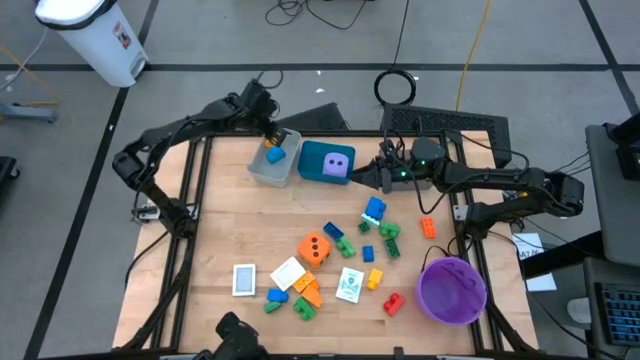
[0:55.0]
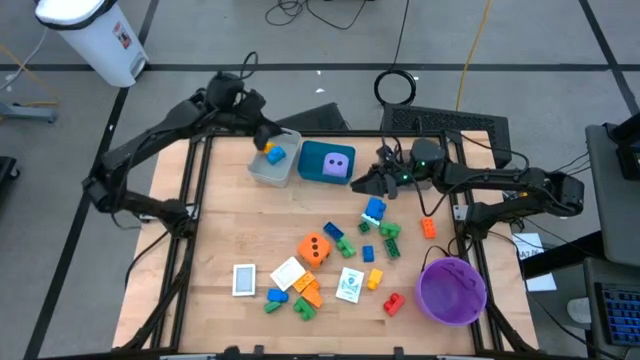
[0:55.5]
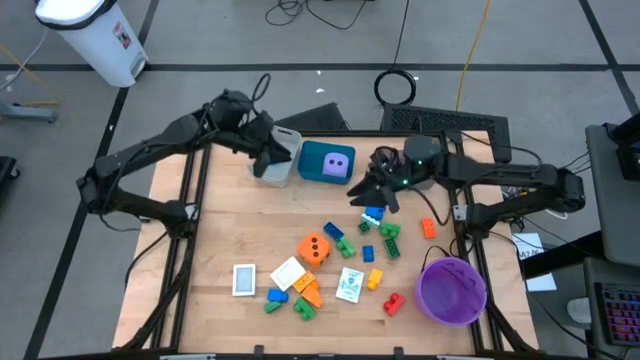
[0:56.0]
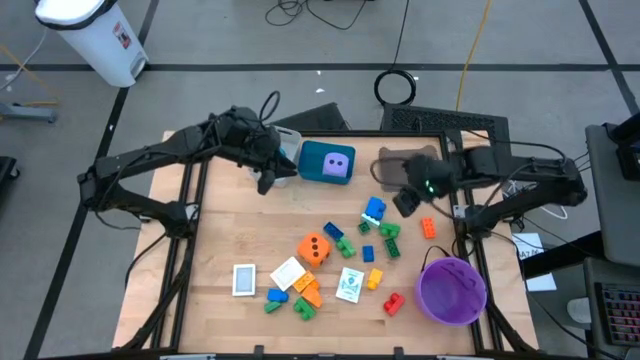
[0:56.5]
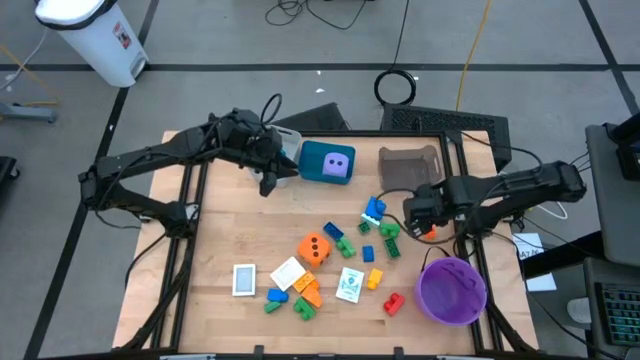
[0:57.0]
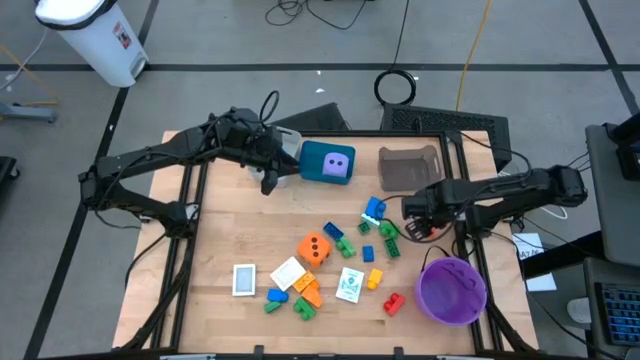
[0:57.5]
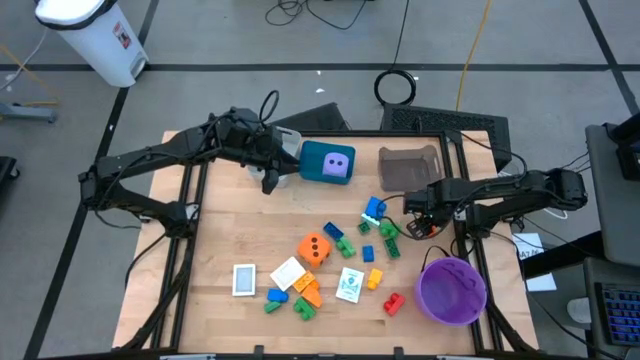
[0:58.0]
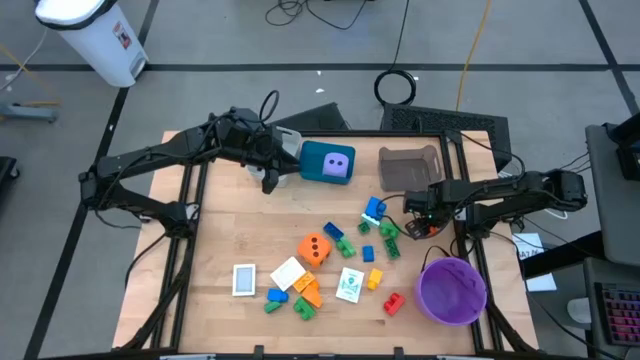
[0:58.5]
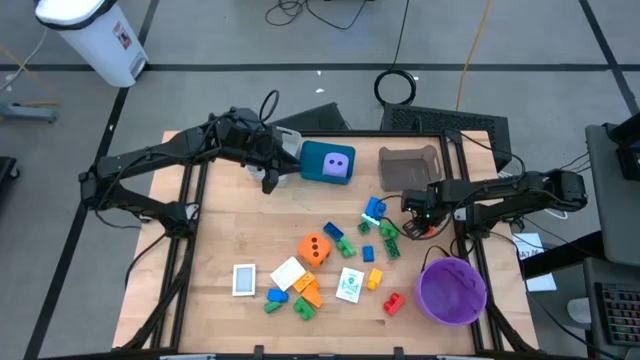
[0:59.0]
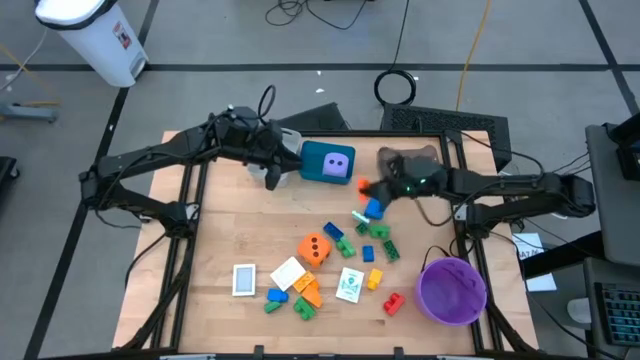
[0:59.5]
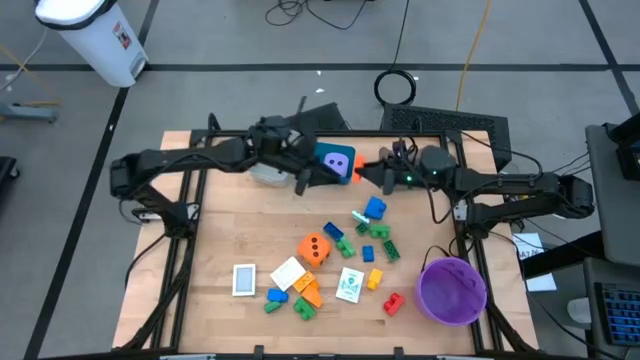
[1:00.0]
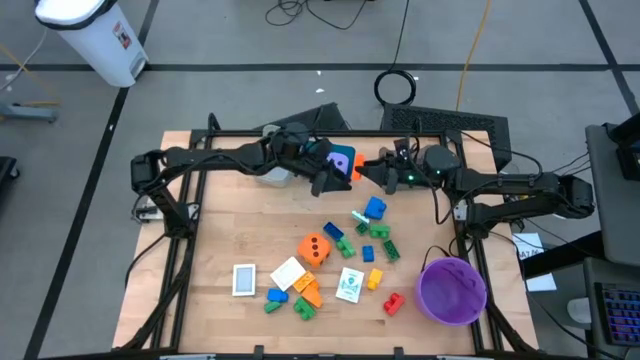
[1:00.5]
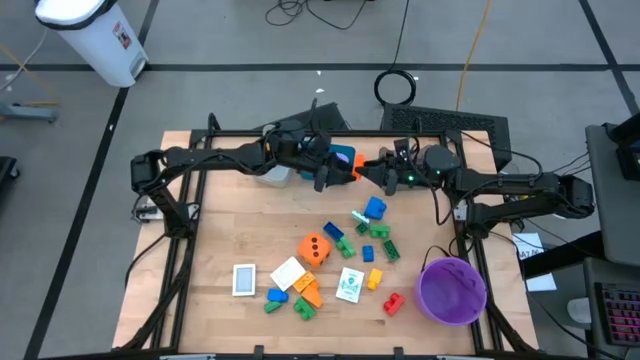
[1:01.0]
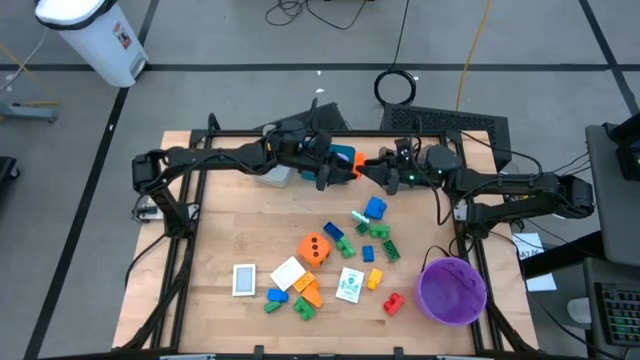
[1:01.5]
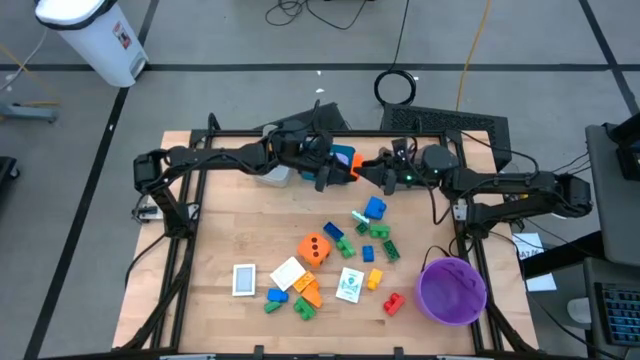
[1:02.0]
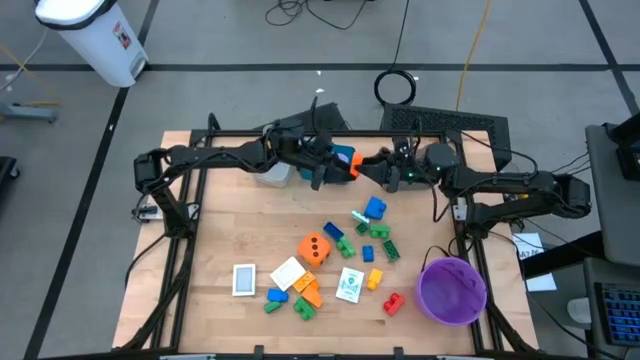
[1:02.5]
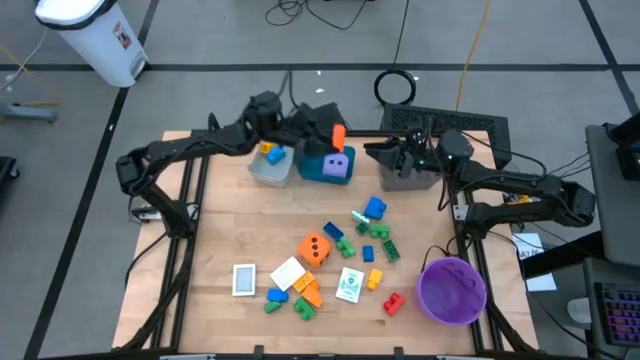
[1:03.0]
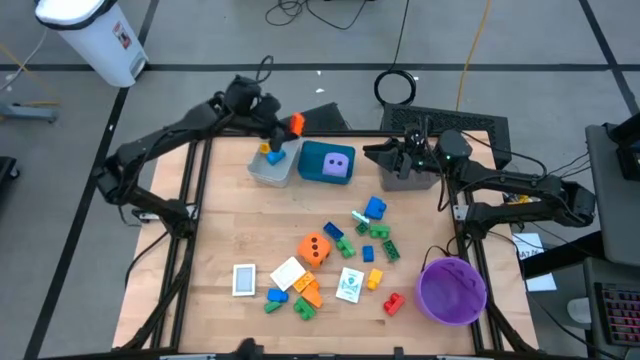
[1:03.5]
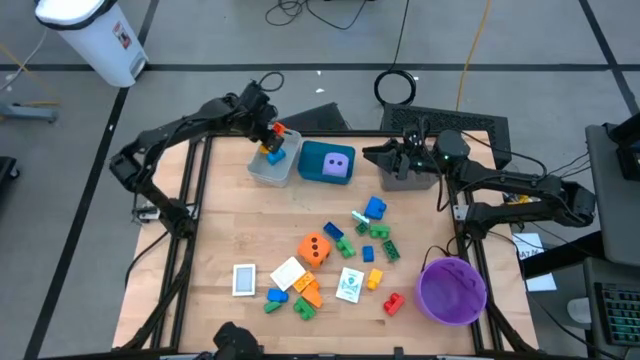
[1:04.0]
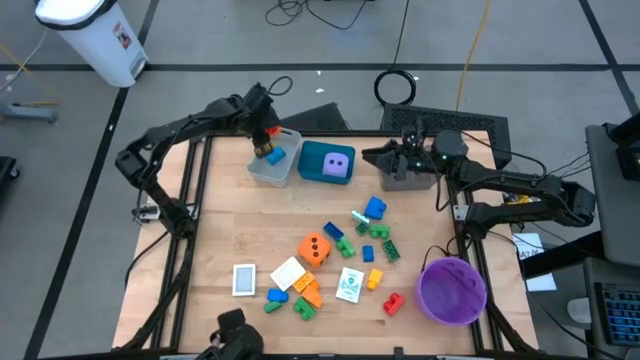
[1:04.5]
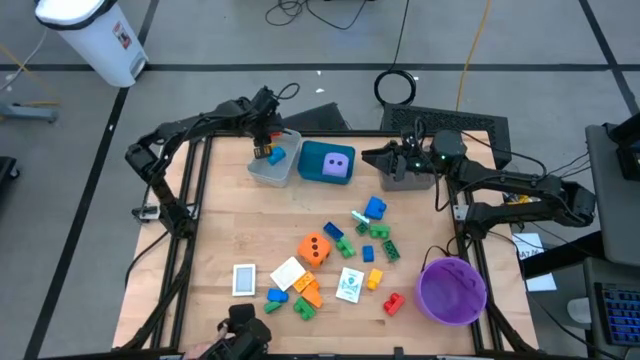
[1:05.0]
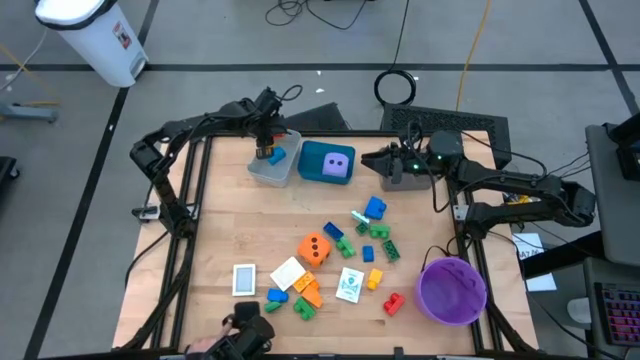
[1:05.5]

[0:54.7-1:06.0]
Task: Pick & Place Toys
Put the orange game piece into the gray bin

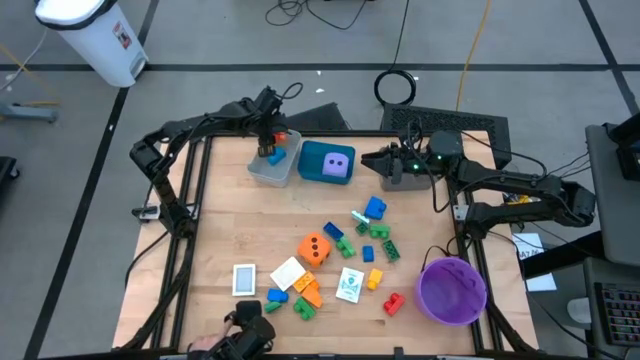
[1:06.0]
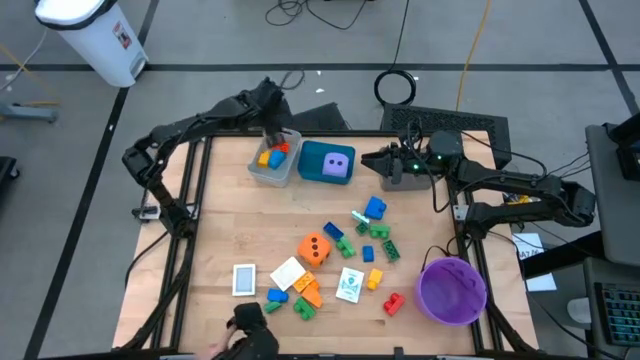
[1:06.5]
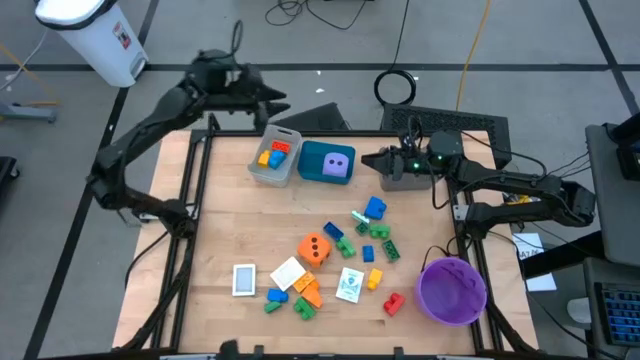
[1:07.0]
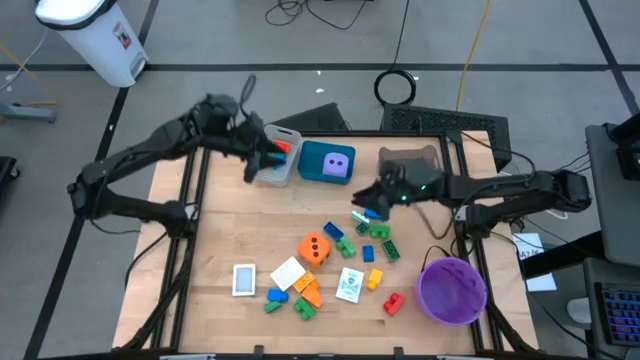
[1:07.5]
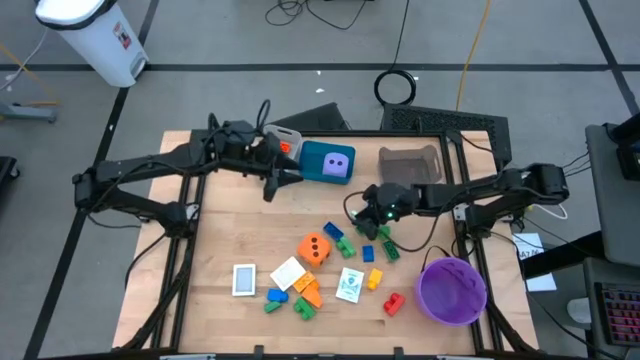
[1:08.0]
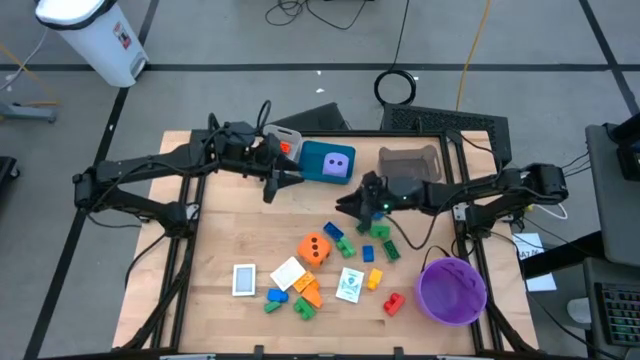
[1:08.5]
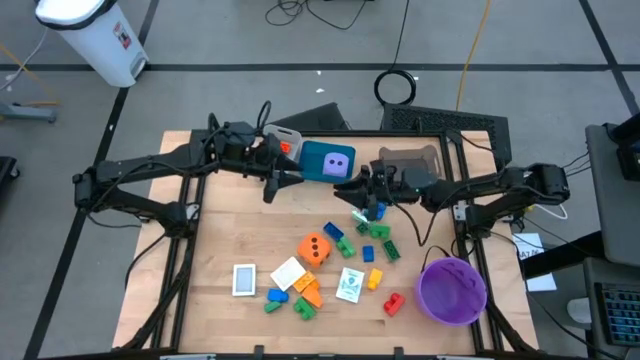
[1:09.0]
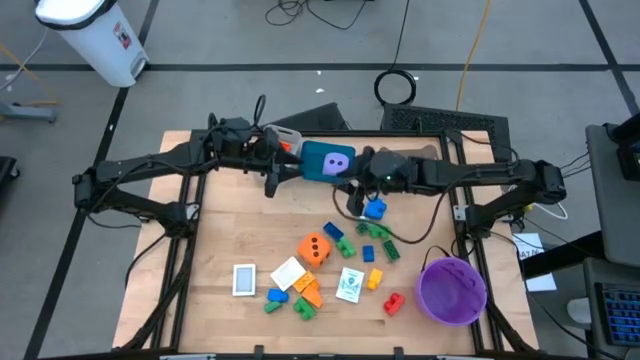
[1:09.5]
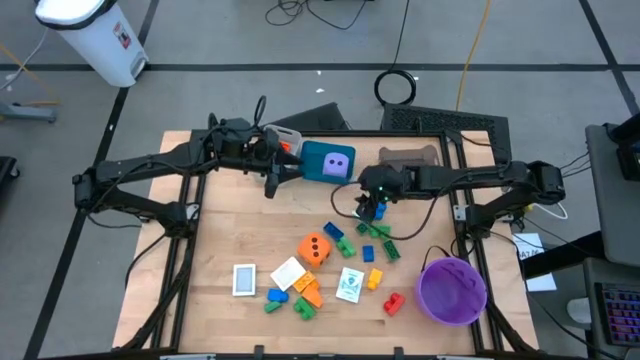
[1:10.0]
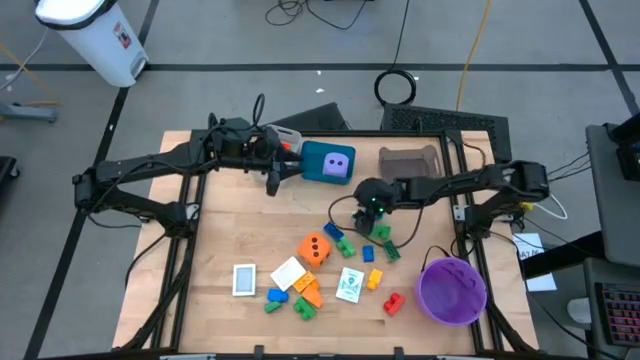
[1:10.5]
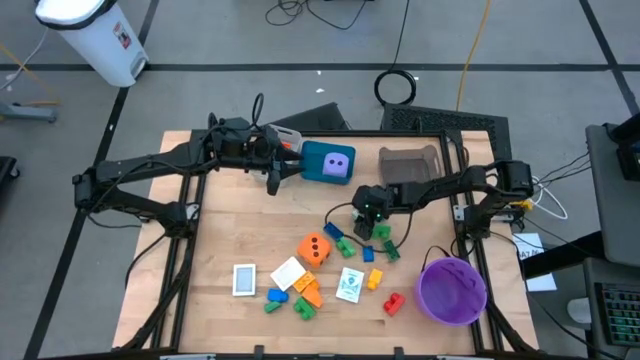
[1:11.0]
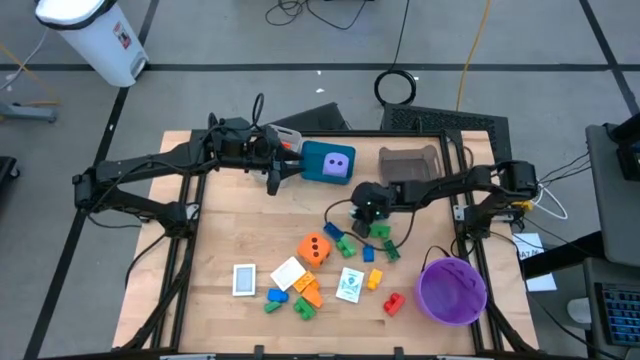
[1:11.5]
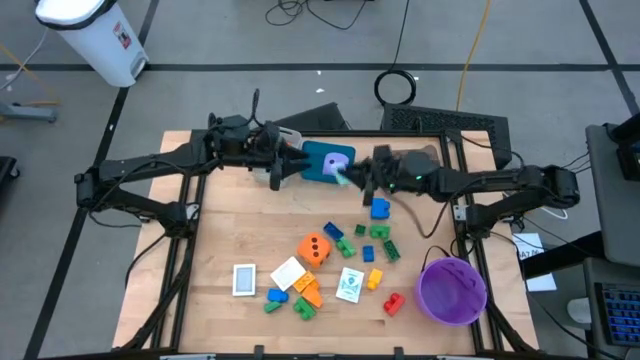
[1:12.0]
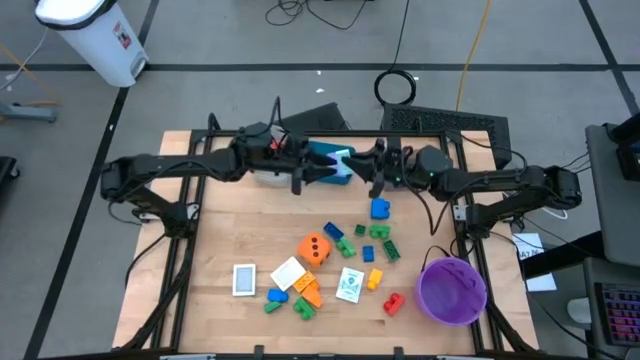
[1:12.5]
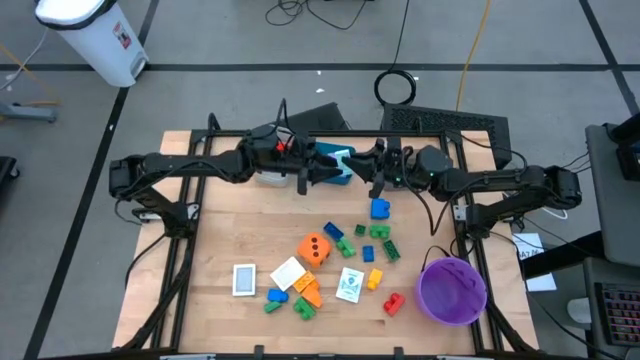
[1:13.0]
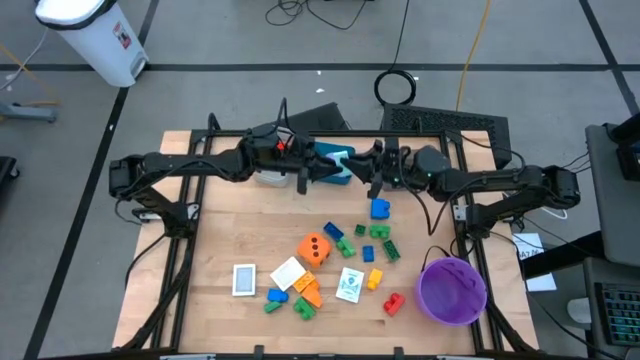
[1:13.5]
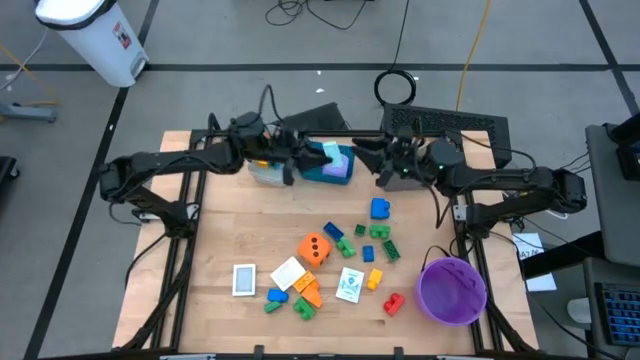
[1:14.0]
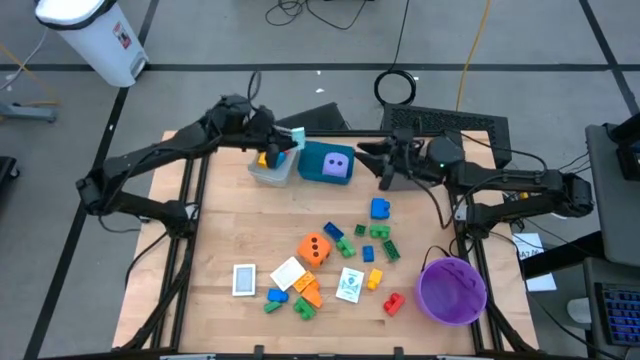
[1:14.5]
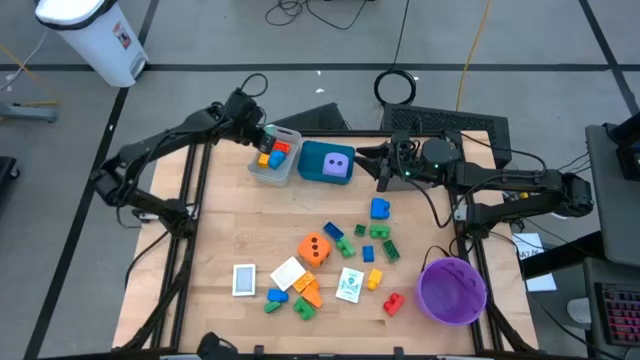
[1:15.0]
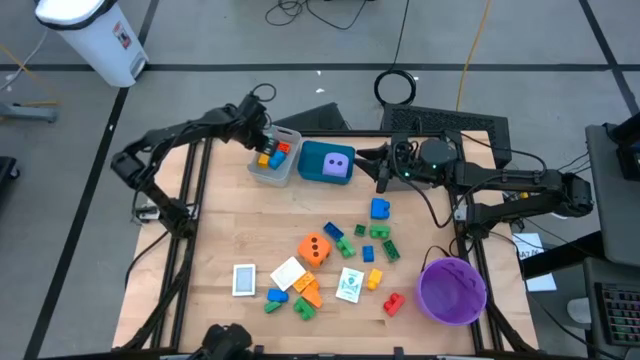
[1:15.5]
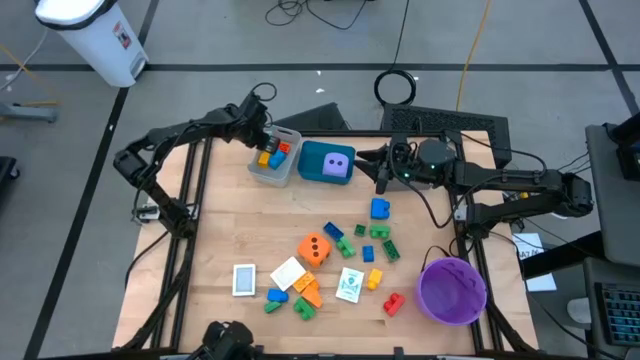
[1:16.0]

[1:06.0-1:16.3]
Put the light blue game piece into the gray bin
